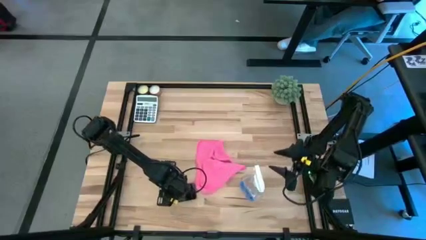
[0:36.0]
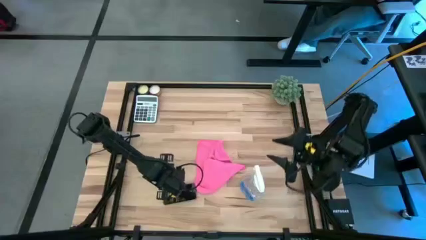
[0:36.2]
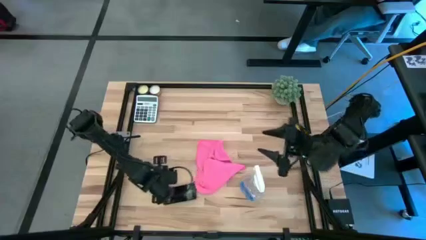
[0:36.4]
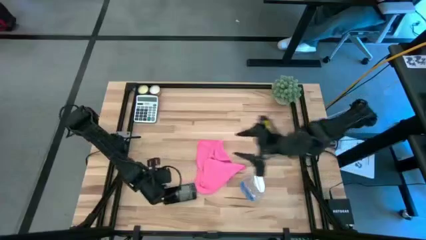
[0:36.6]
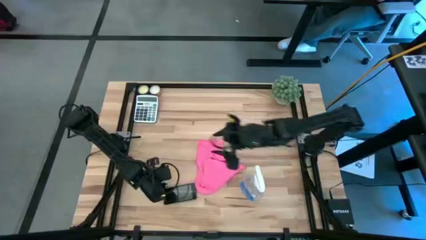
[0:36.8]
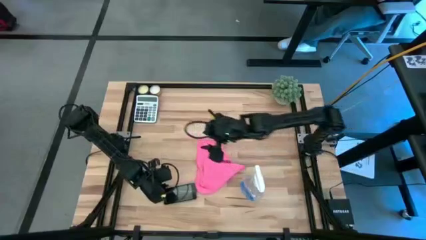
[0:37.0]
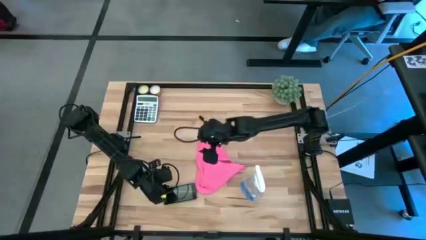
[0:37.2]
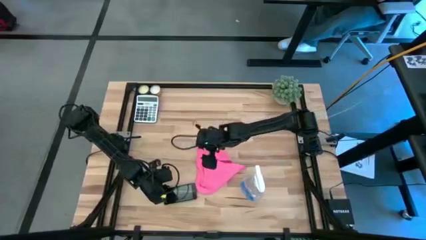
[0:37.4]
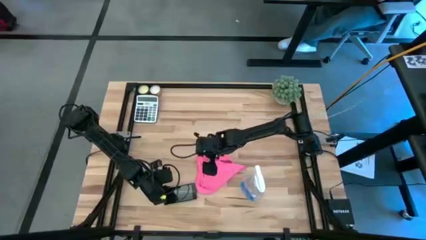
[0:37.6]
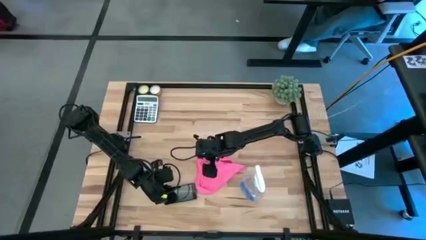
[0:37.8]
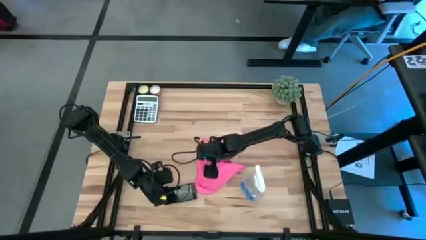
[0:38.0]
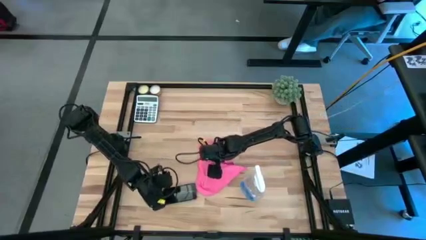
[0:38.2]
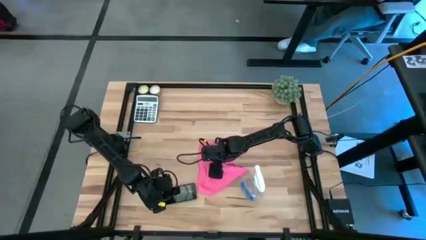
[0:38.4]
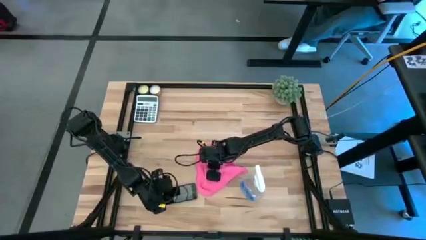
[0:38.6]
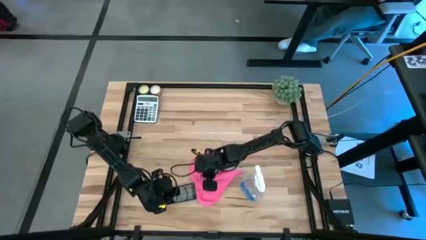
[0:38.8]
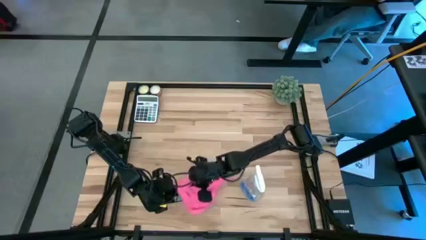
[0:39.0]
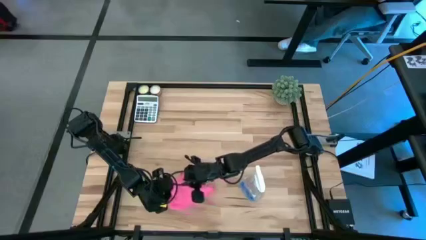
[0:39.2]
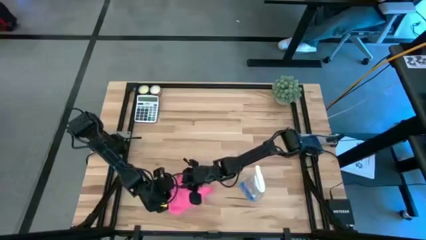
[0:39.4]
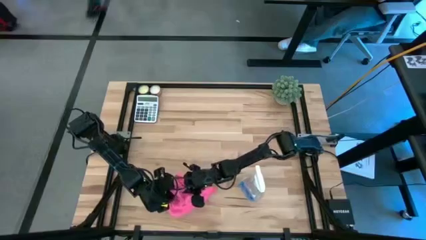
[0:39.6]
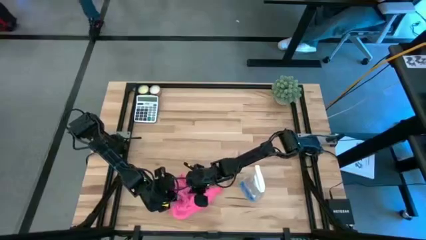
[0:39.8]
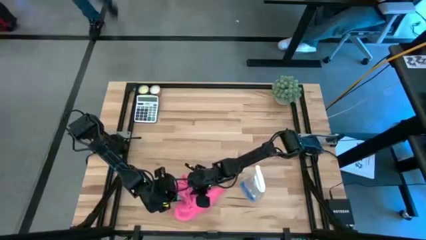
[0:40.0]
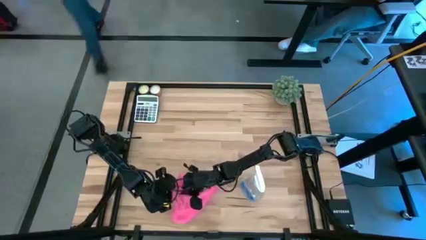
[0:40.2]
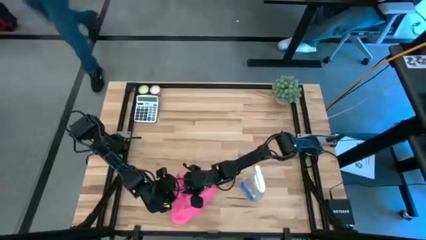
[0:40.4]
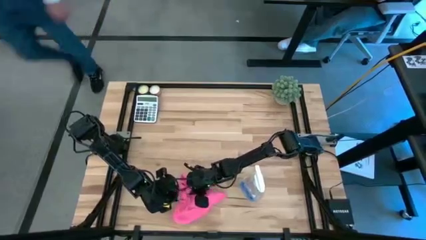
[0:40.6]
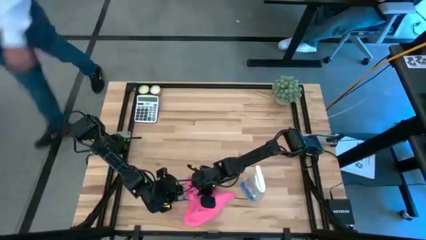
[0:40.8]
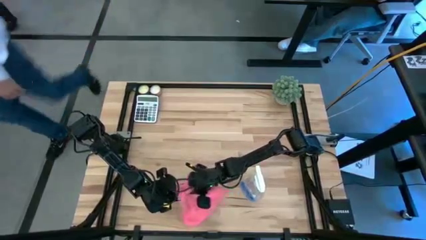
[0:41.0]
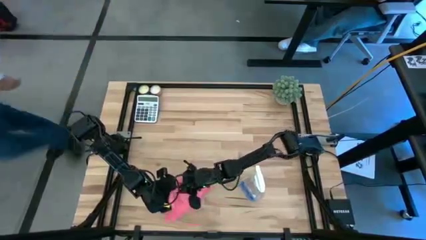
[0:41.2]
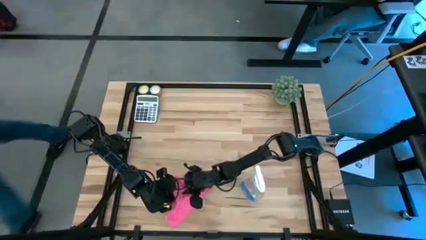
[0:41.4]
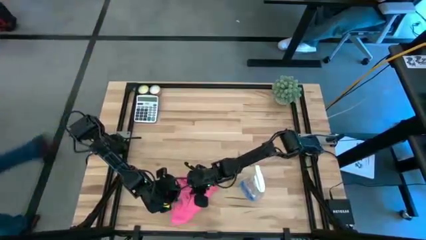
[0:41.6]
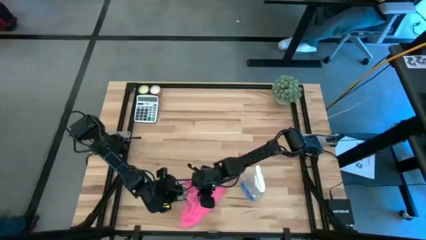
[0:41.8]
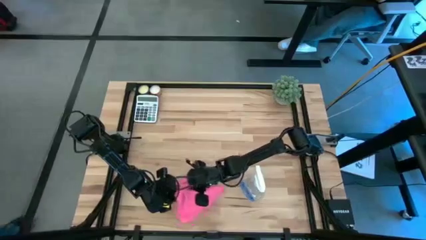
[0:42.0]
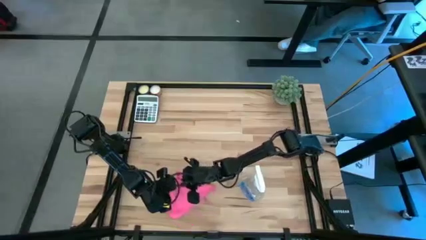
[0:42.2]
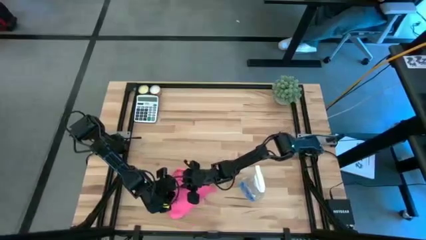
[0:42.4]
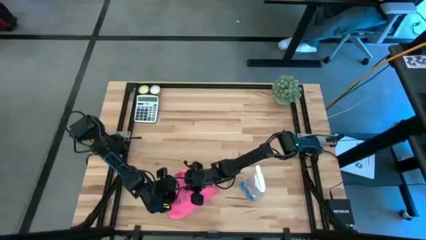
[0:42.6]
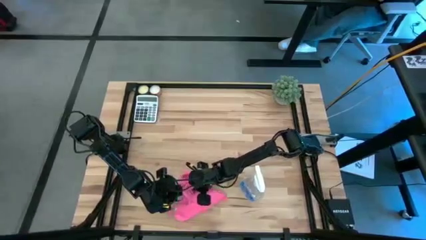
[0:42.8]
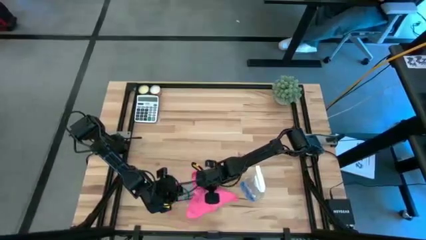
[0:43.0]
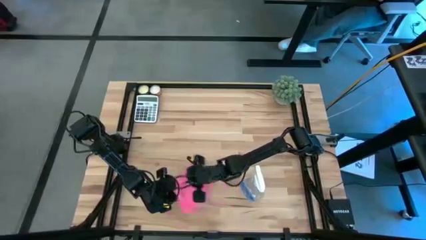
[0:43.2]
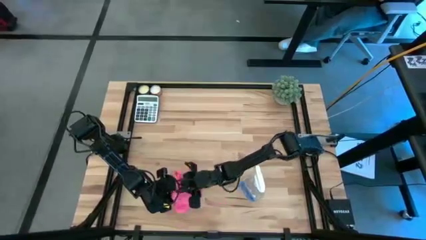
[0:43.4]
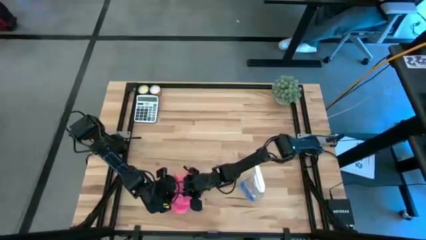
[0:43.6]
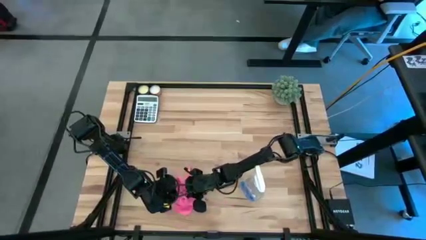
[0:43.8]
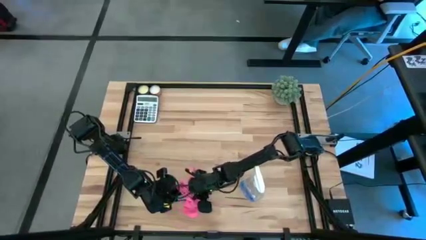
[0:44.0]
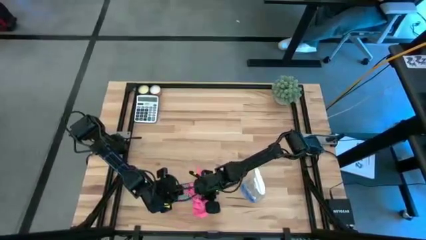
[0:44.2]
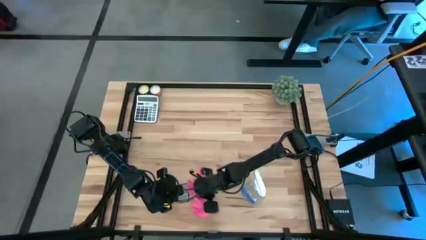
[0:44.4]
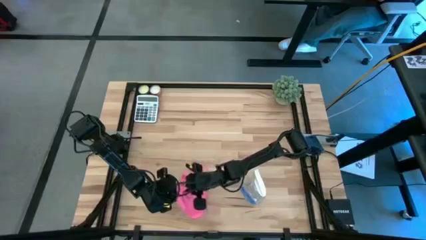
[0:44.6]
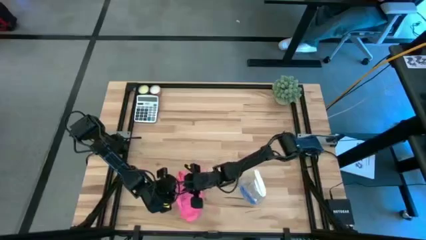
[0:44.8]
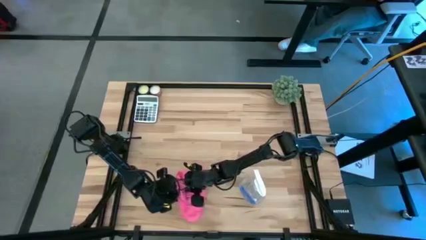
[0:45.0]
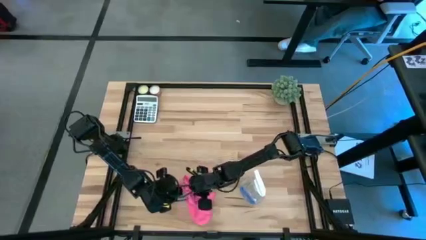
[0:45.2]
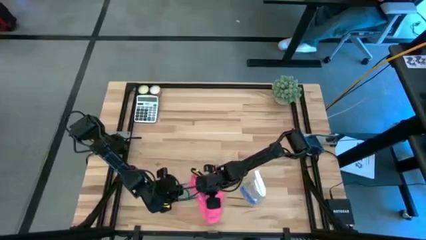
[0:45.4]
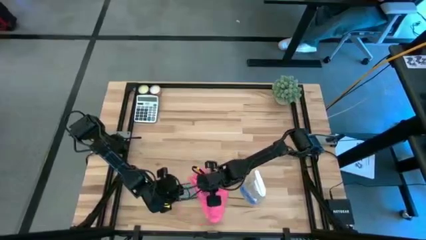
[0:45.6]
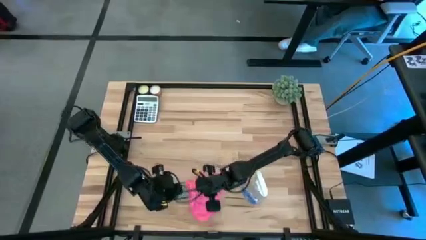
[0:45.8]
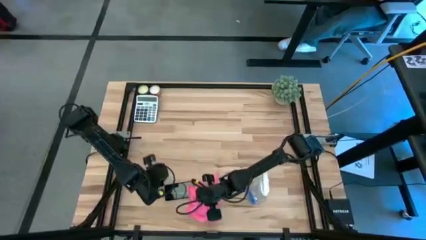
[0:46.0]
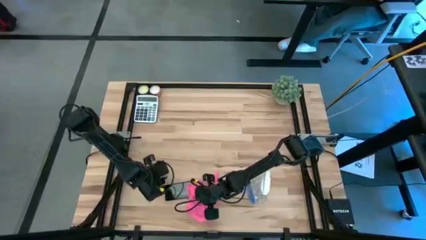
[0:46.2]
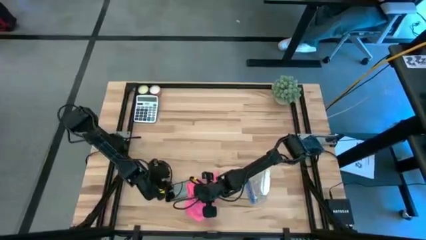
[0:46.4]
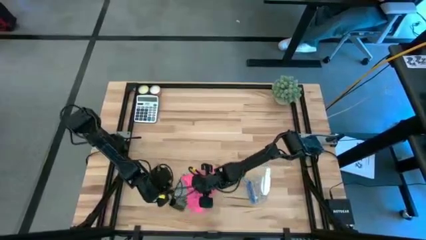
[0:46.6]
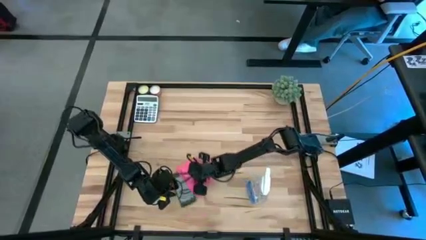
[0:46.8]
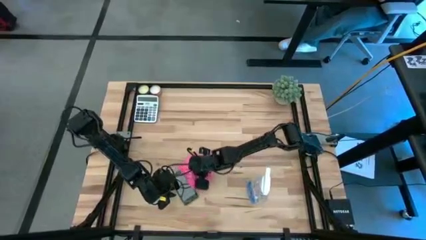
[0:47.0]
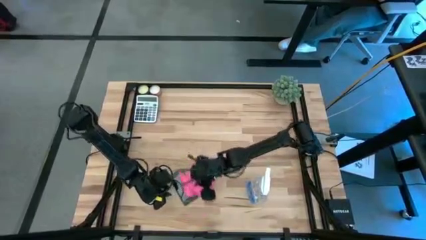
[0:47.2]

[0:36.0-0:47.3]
Task: Apply microfiber cloth
Wipe the black cellphone with the pink microfiber cloth
